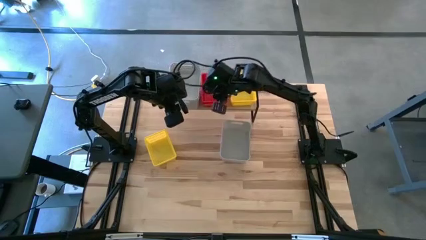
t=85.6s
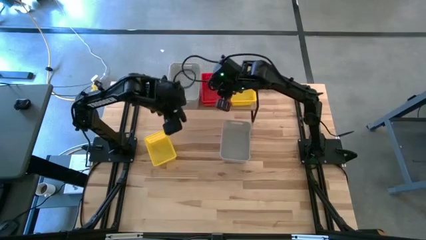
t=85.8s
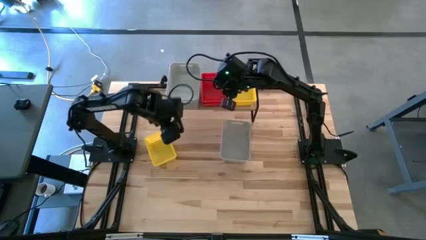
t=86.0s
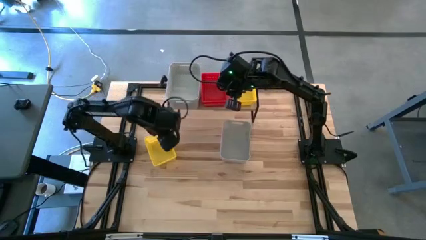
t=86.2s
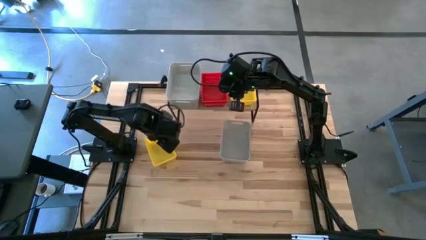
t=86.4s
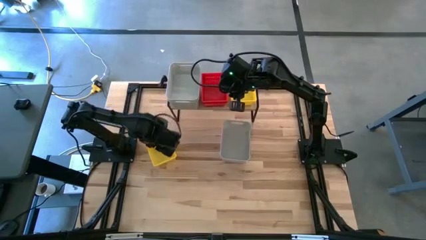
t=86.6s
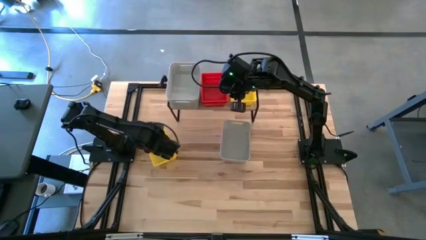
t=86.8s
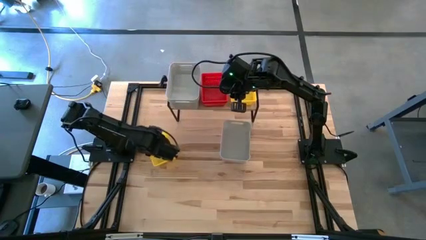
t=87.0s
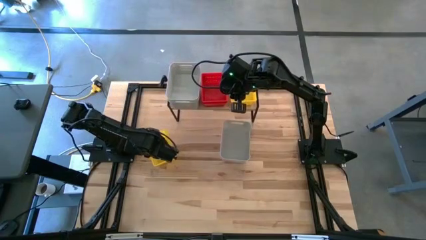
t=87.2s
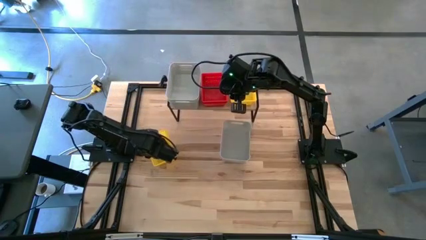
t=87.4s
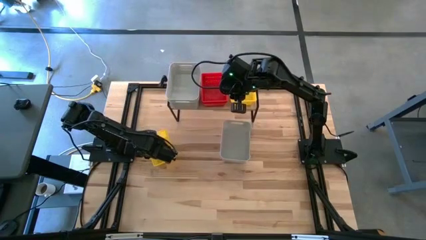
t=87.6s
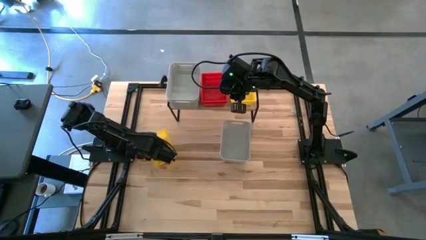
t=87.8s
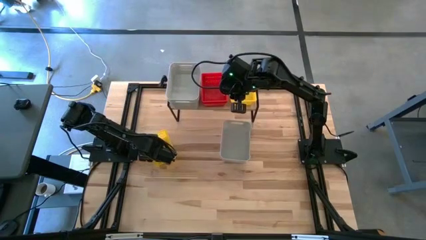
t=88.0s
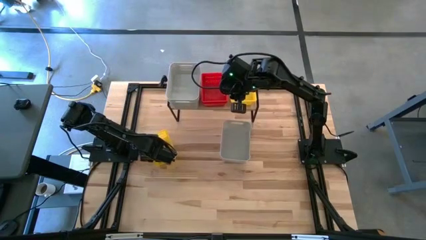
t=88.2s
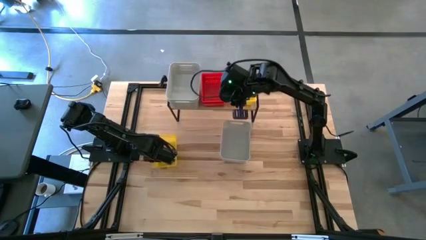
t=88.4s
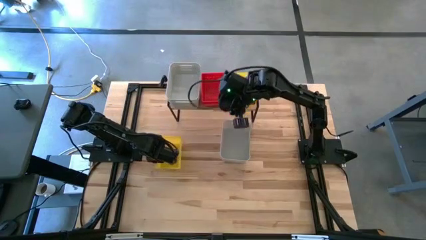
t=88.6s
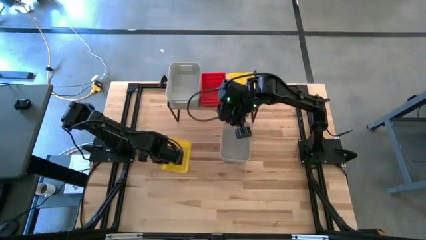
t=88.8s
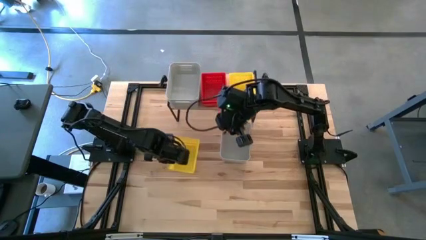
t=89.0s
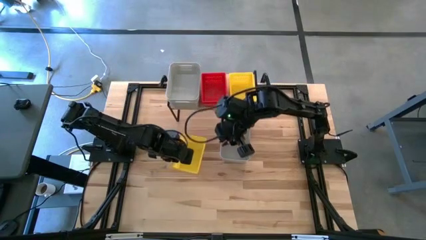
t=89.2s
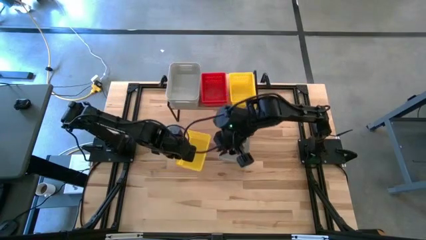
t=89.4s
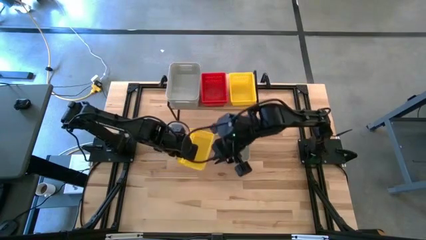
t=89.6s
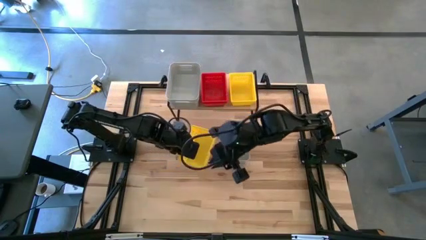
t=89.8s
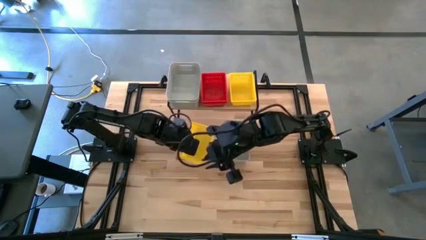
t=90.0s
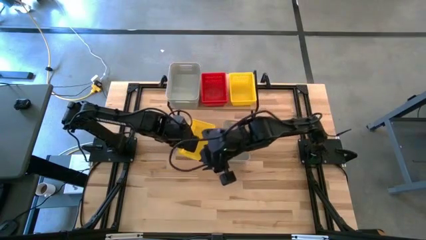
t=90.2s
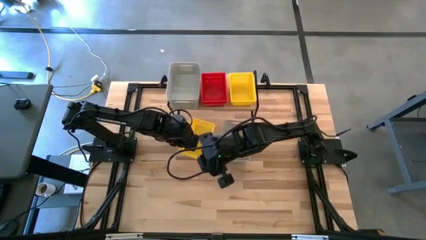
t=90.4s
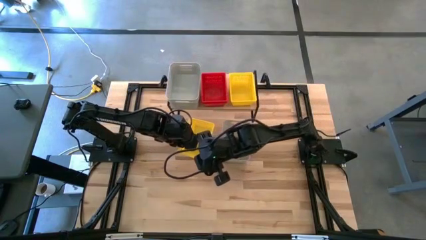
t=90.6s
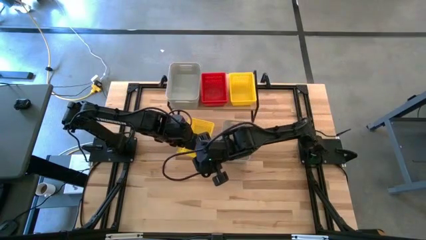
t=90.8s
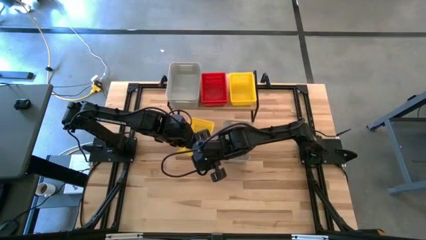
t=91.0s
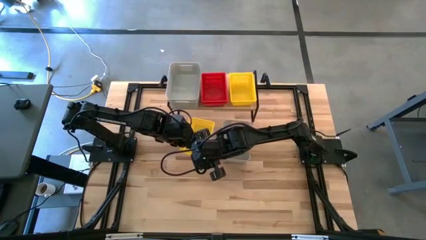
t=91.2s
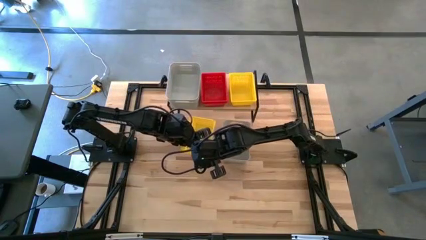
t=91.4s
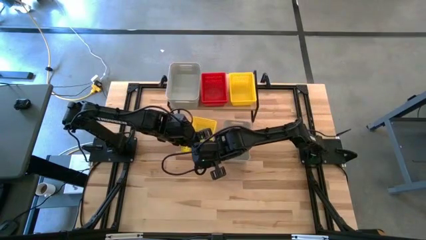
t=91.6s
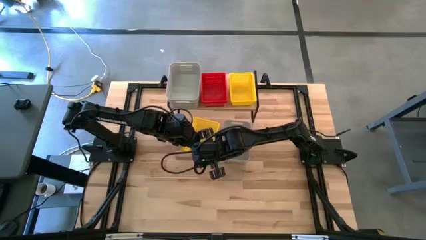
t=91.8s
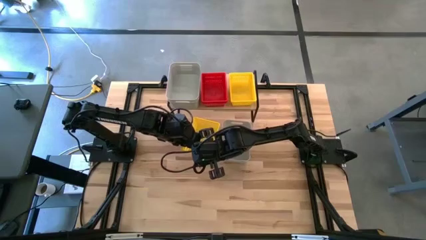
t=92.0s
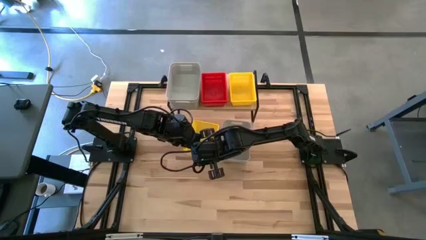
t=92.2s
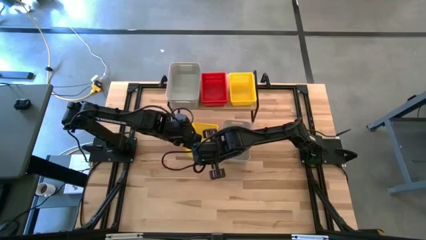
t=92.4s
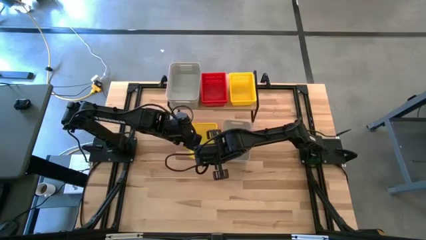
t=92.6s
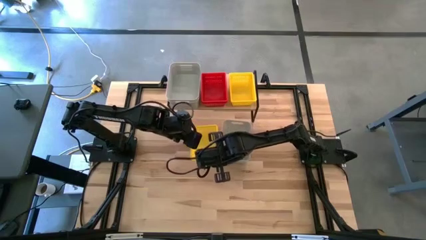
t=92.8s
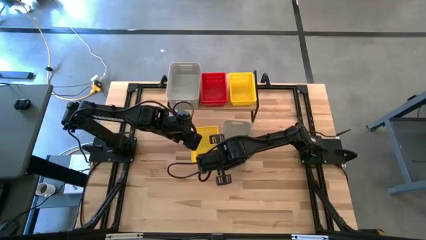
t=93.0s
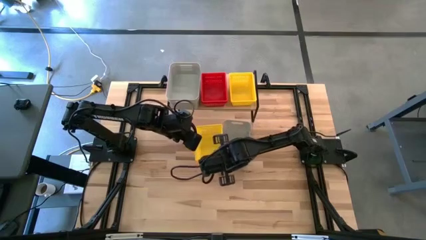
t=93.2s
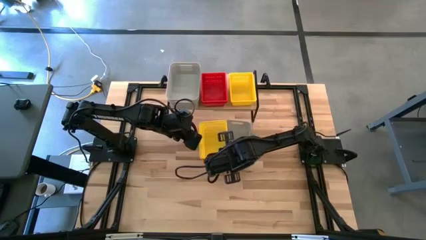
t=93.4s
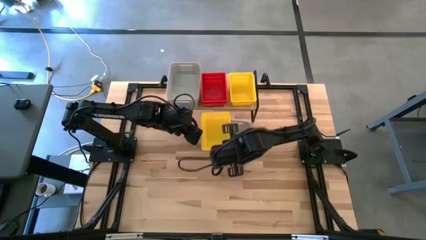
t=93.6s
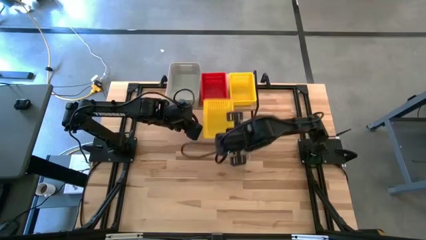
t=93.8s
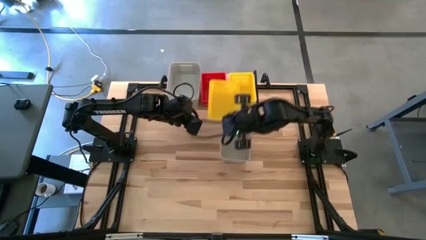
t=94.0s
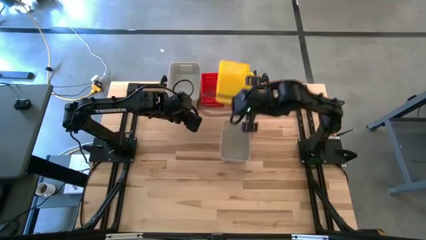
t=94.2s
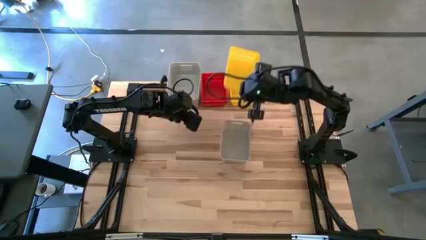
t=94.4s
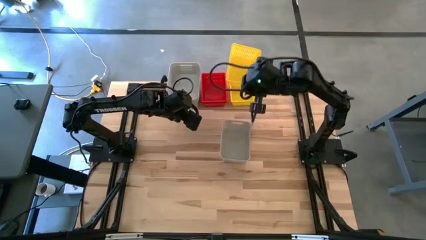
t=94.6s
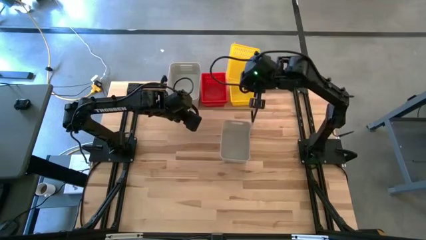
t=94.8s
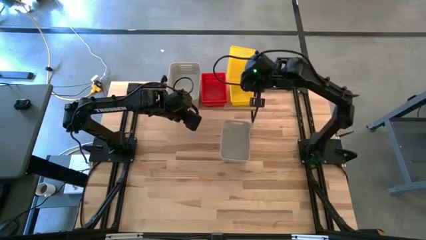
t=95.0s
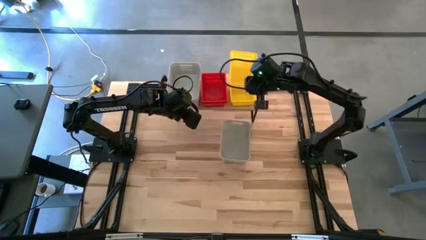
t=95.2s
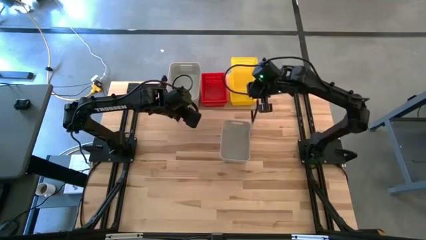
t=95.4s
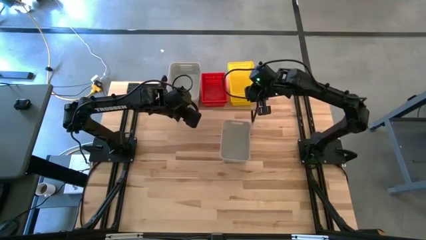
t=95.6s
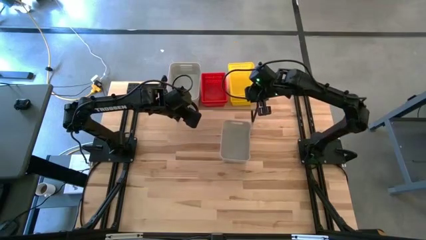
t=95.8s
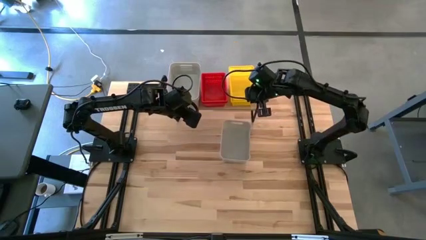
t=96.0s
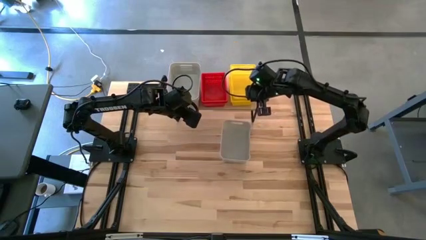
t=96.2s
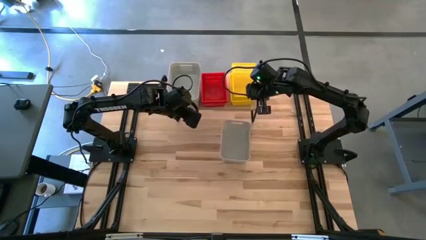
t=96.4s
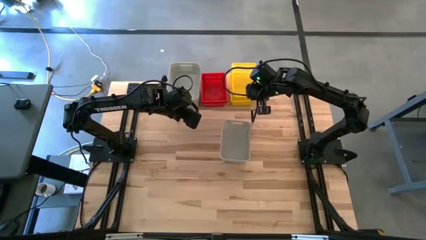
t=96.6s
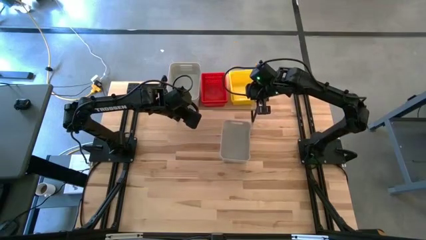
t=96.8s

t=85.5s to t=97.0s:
Task: Stack baskets on shelf by color
Stack the yellow bin on top of the yellow bins on the shelf

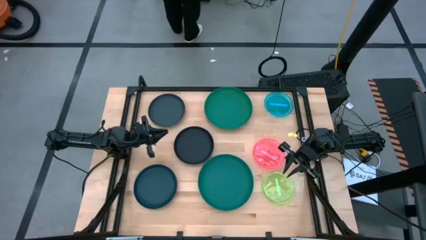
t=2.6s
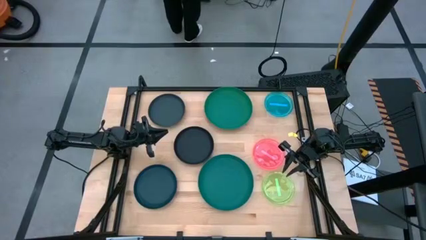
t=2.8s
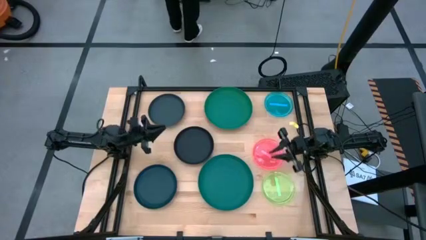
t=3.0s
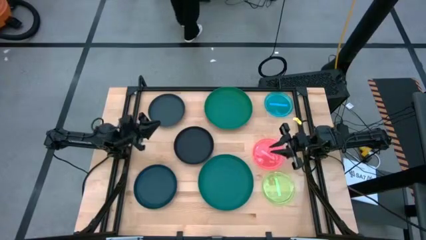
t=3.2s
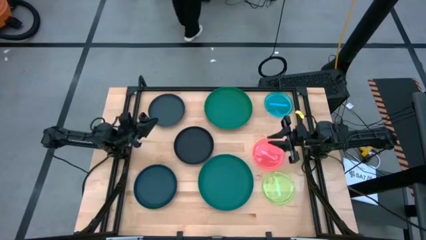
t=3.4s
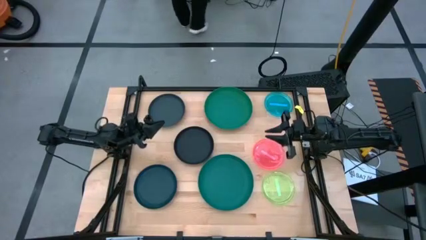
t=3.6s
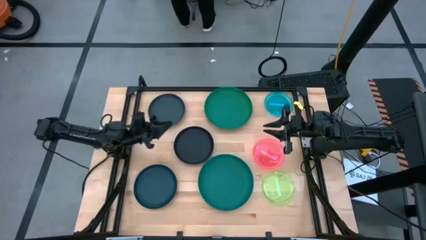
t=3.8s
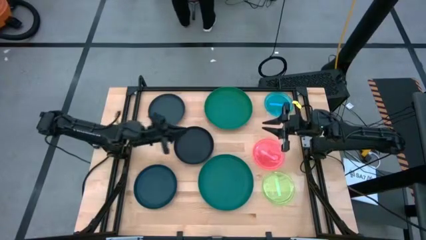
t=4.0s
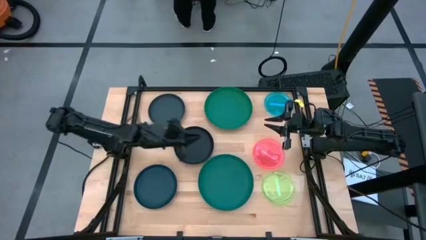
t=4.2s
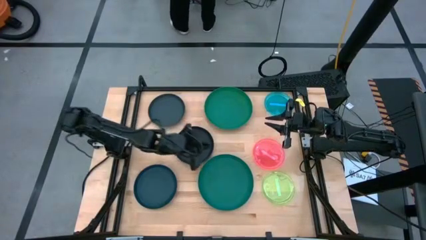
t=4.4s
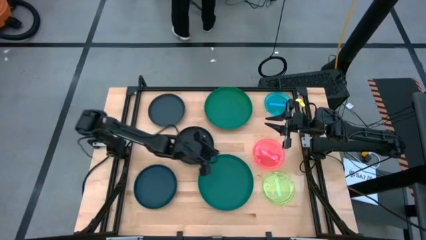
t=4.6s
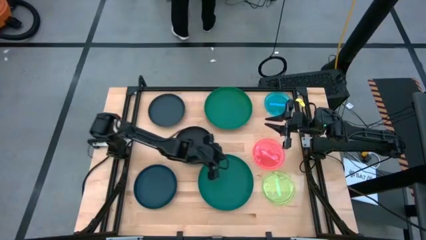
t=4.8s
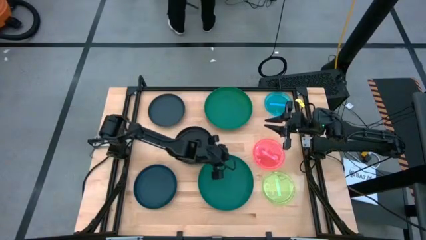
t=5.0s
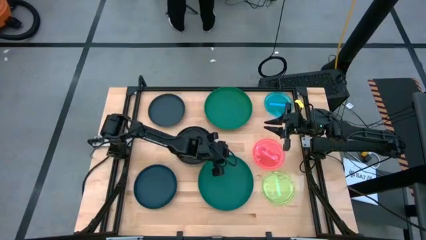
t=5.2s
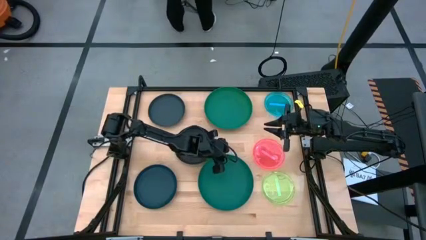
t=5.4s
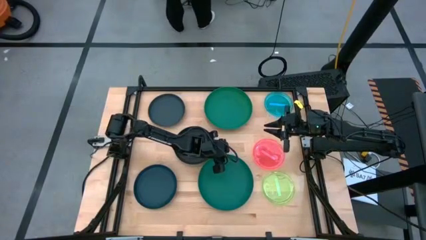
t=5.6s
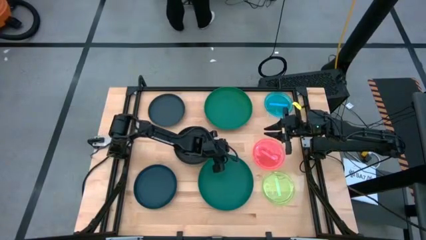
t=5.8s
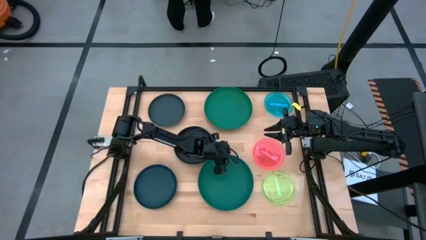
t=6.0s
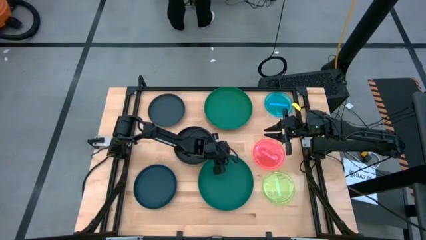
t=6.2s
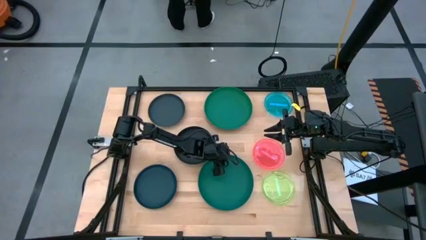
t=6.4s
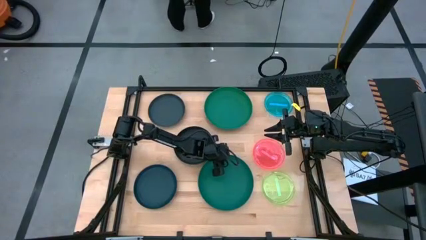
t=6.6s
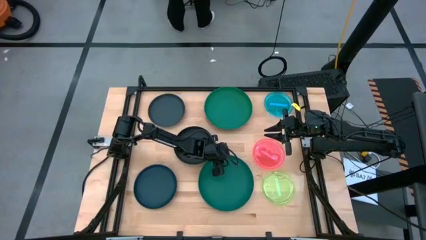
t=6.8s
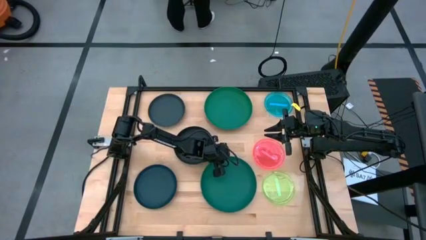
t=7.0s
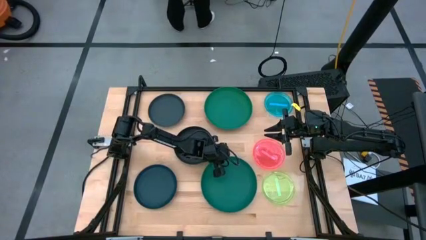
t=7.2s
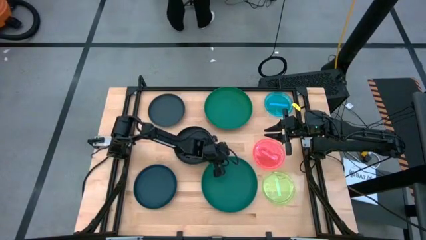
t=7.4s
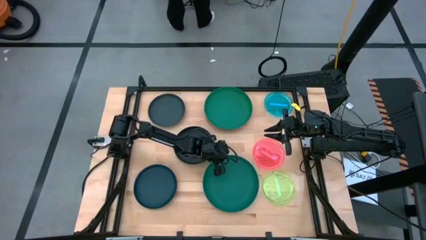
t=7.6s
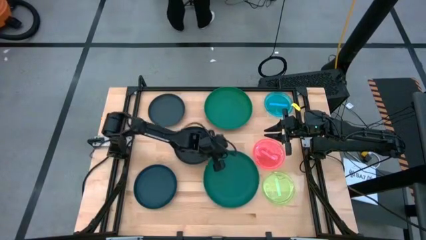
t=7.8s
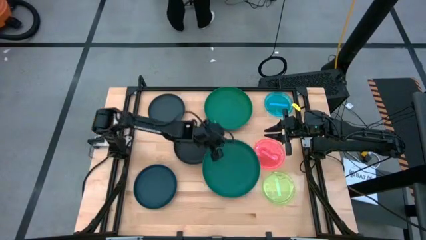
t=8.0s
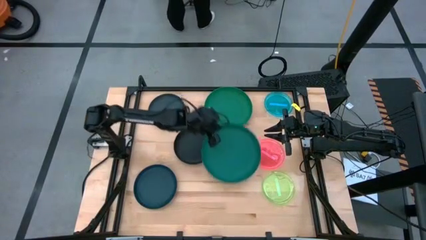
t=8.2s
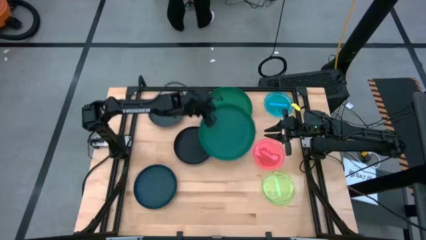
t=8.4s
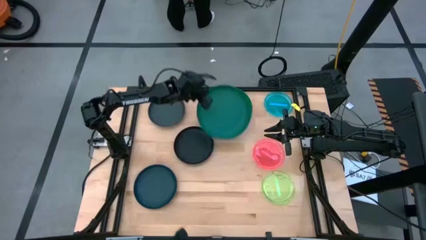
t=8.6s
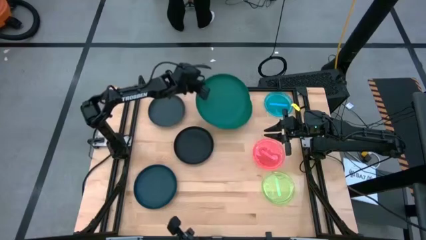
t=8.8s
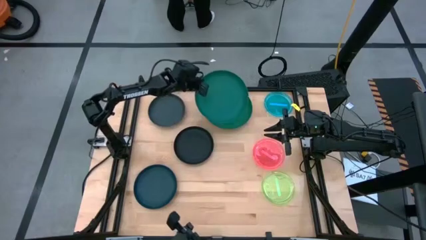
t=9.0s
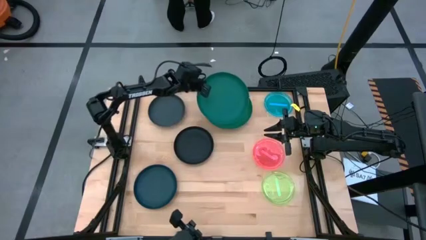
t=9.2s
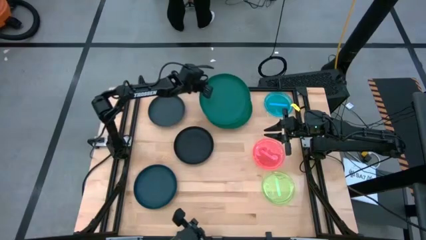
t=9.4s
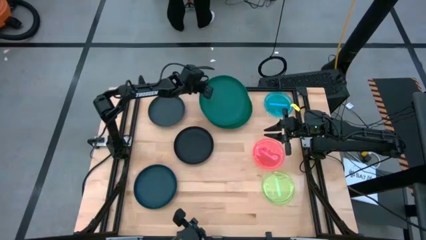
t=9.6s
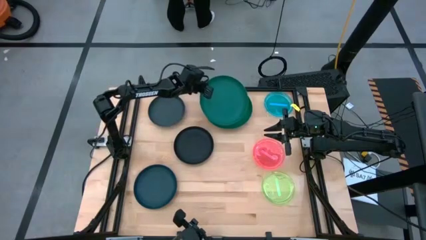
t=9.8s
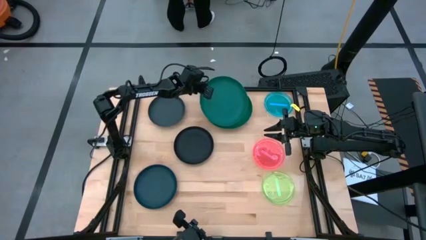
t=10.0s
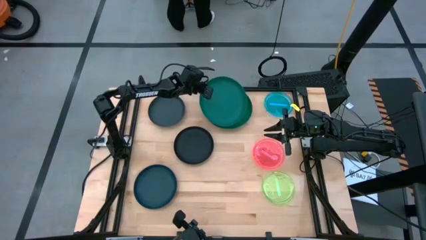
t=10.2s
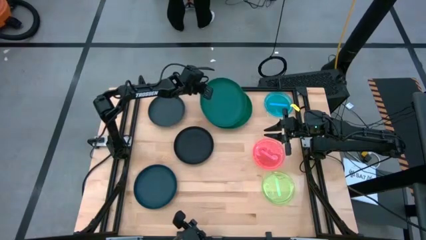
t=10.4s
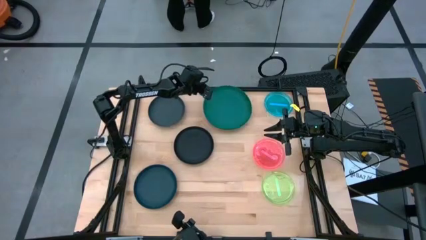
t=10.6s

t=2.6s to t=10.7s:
Task: Stack plastic plates
Stack the bottom dark green plate on top of the other dark green plate
